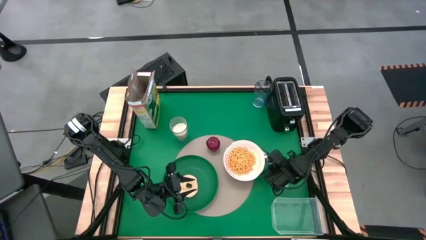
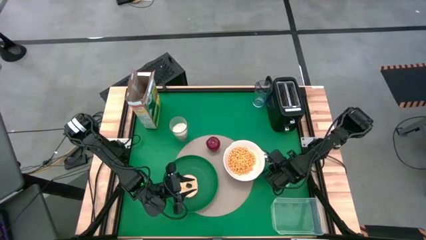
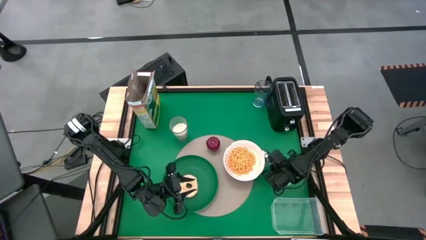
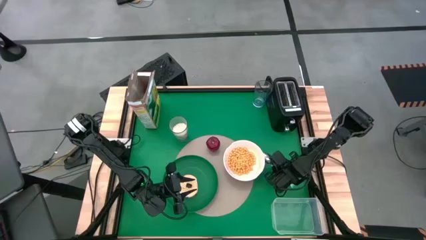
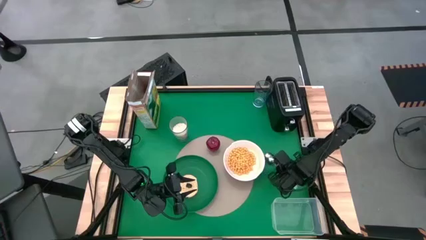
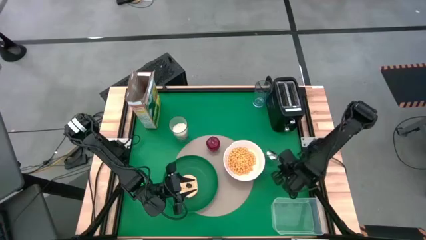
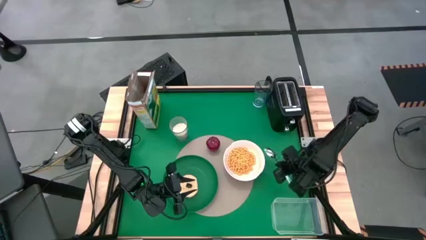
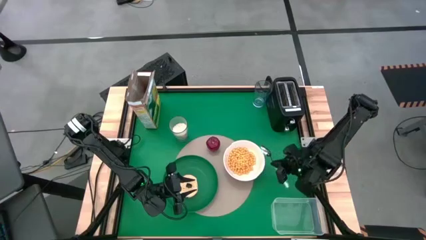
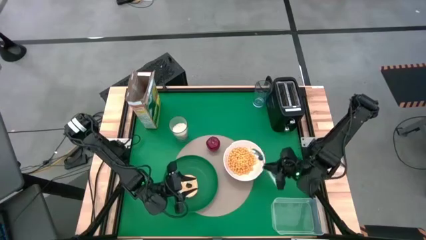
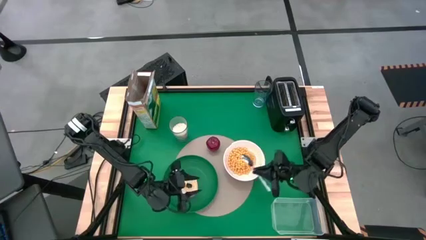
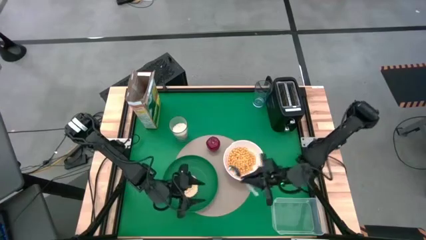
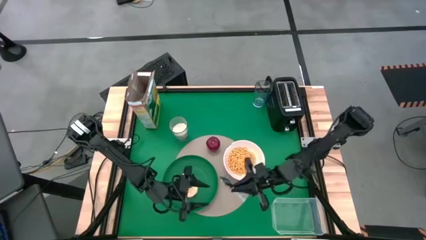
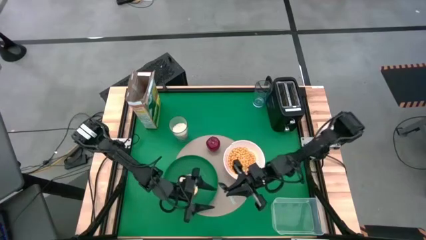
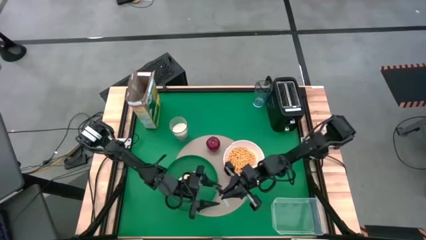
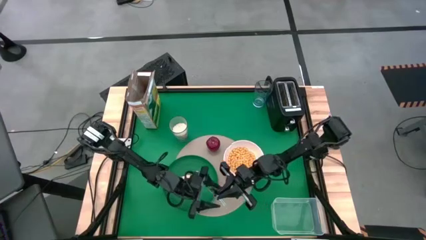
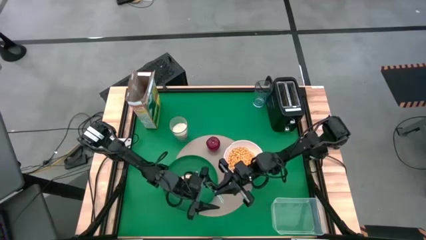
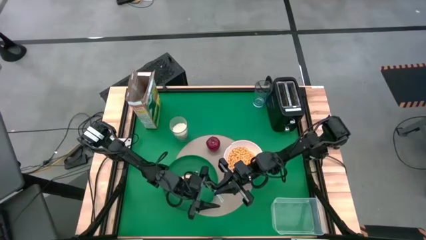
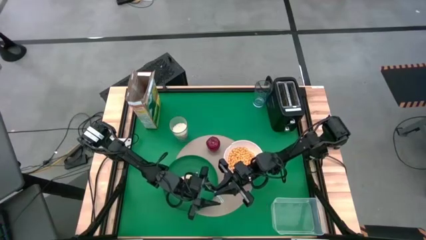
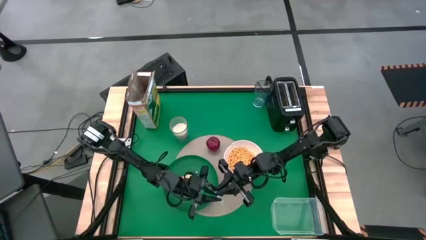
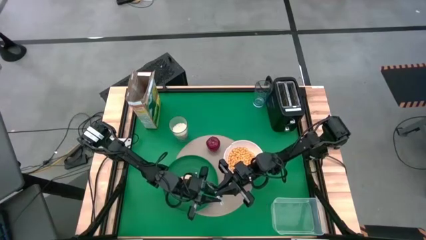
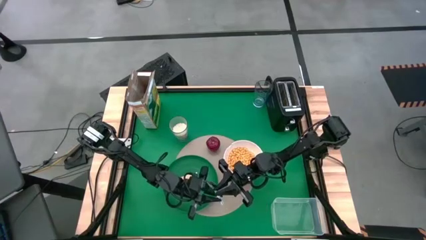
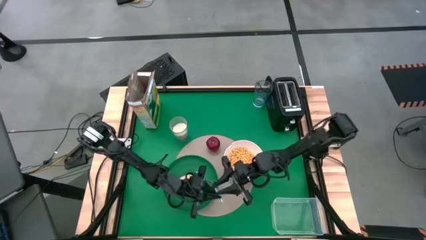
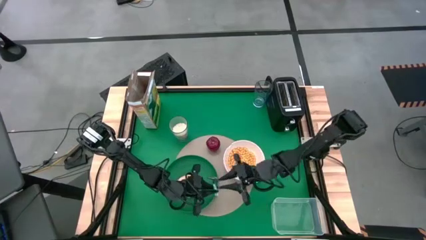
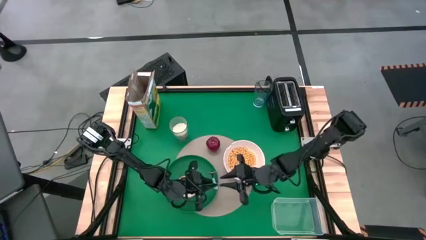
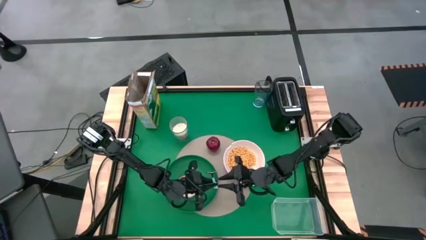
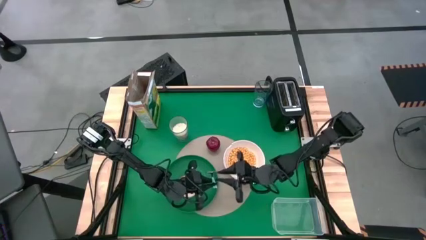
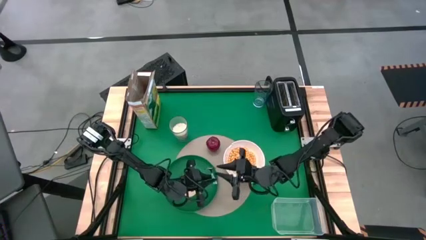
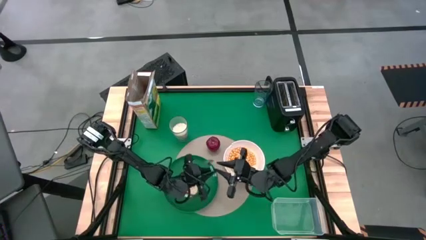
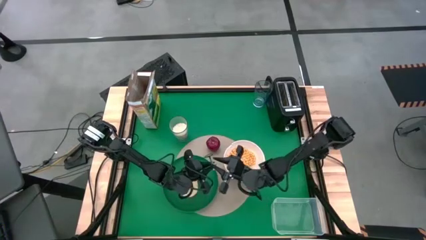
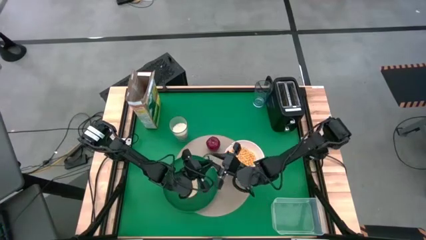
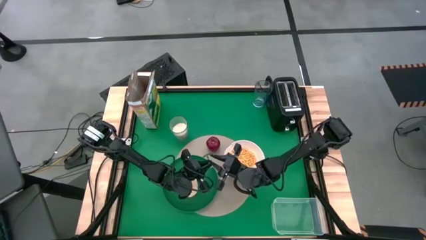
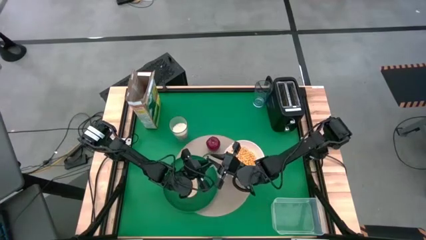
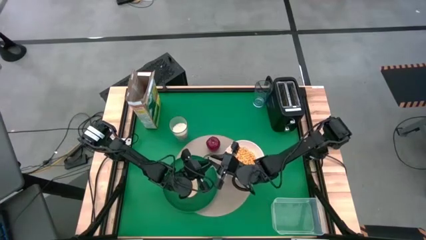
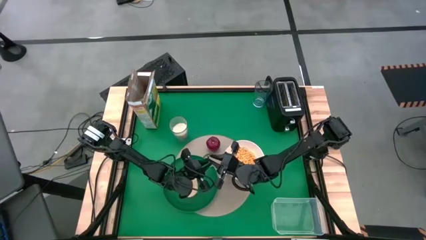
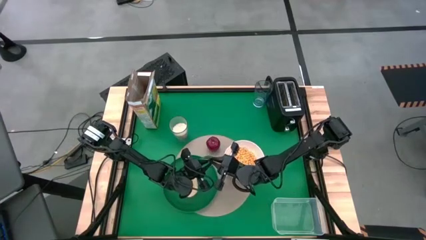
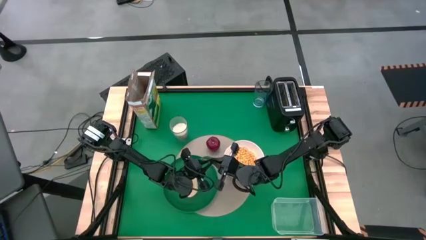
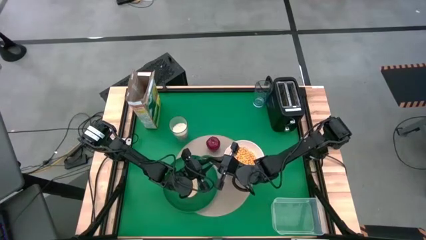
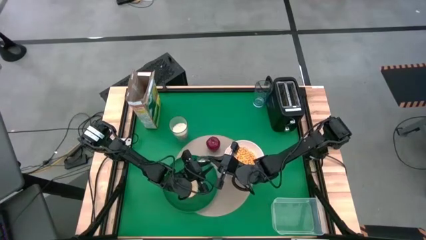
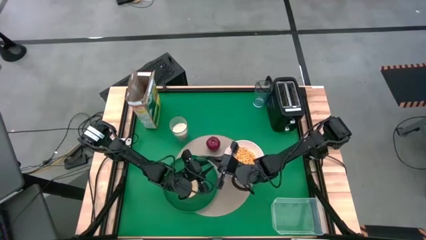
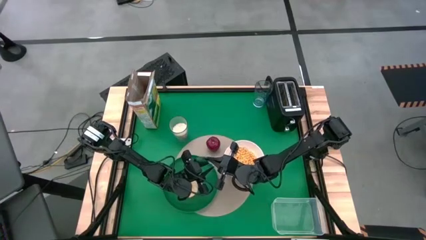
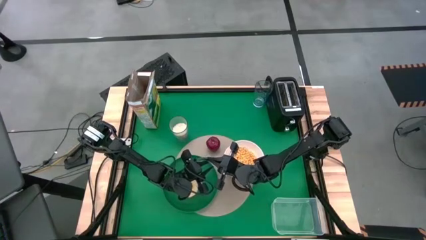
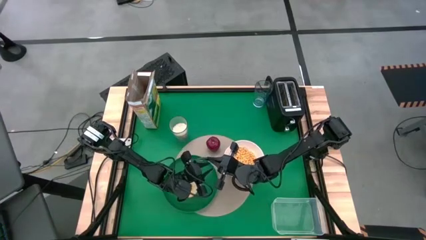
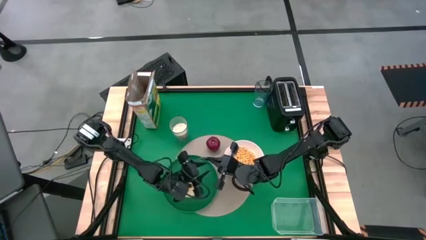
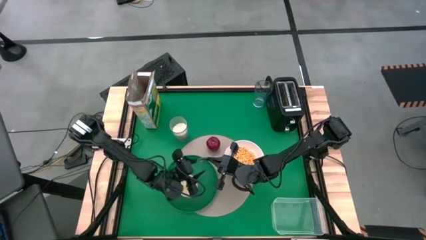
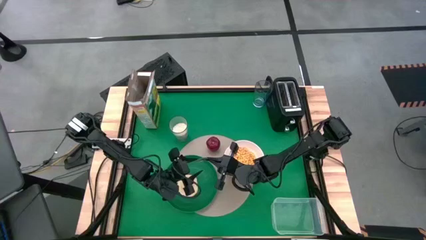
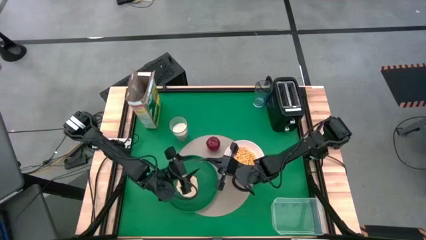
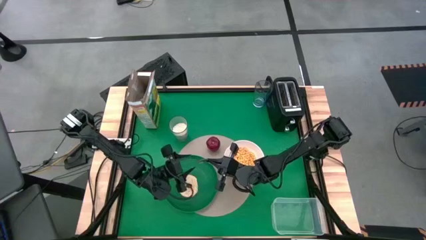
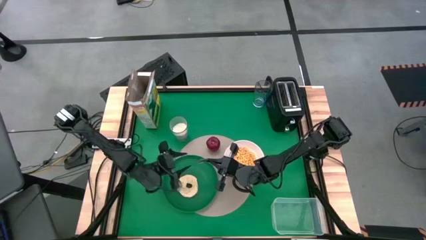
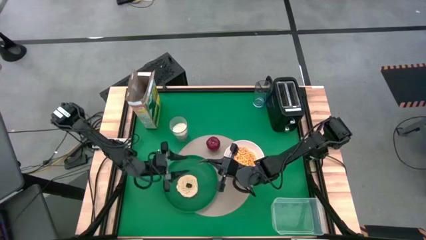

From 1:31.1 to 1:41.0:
Task: Arrange a breakfast setting
Put the white green spoon to the right of the white bowl on the table

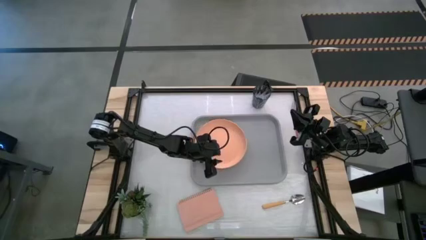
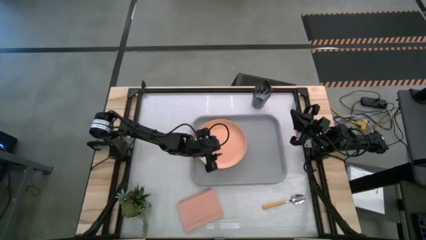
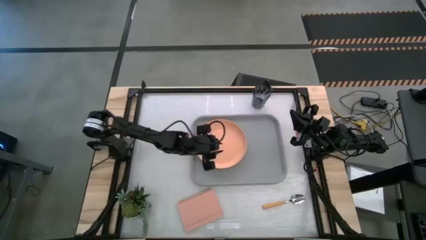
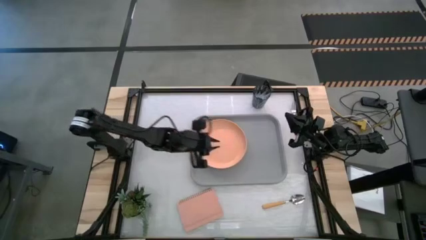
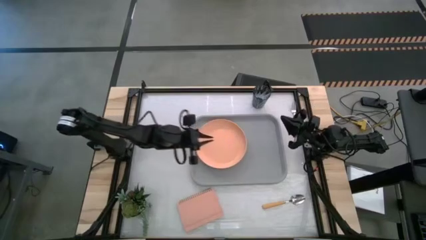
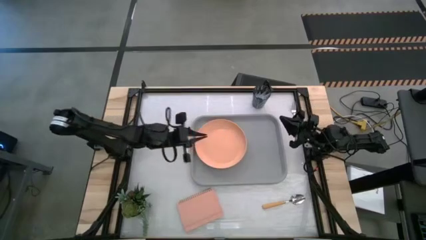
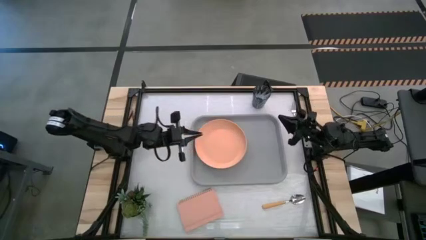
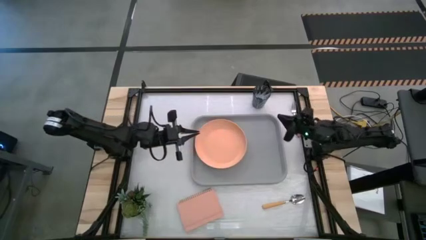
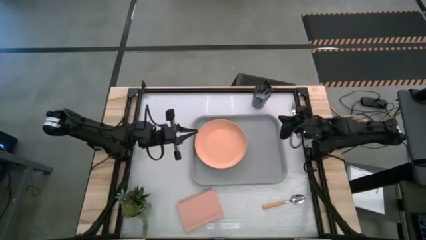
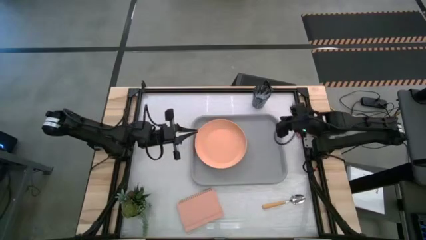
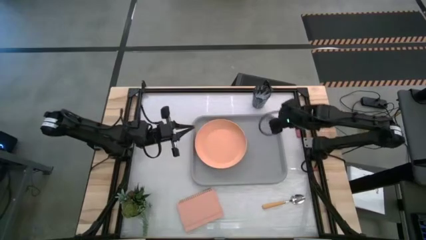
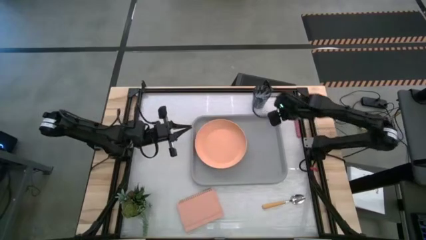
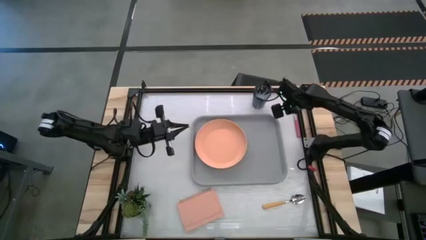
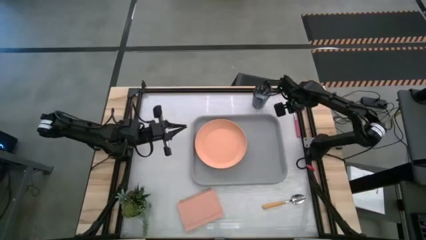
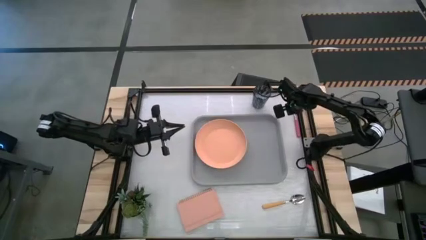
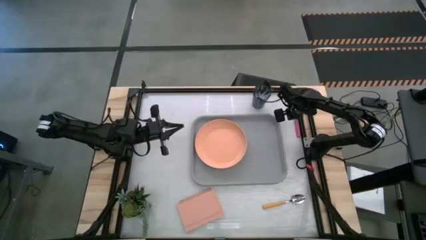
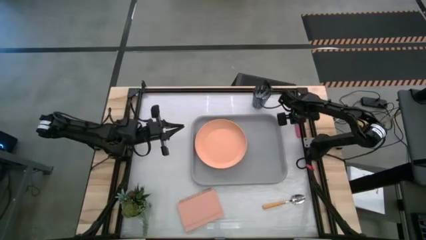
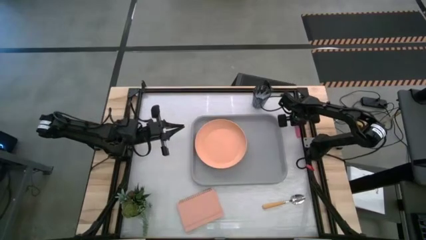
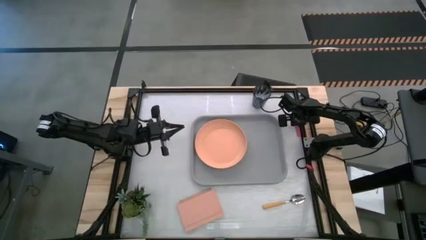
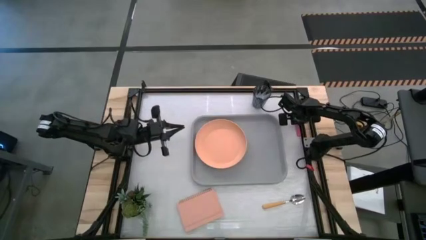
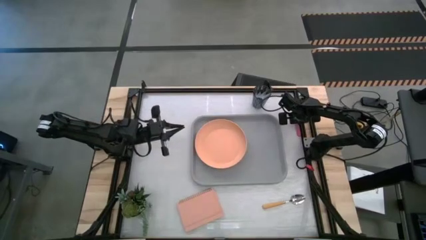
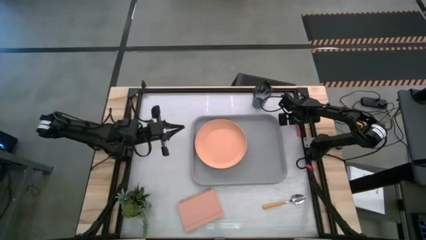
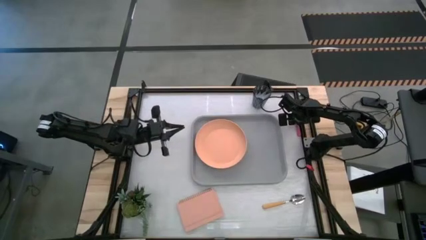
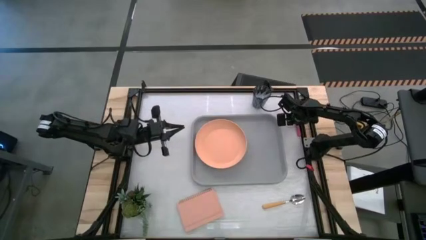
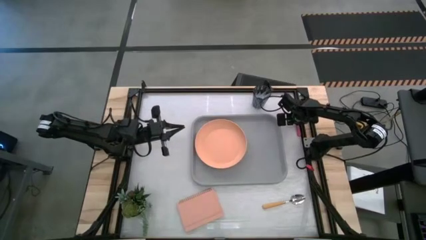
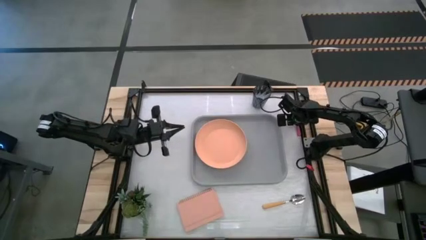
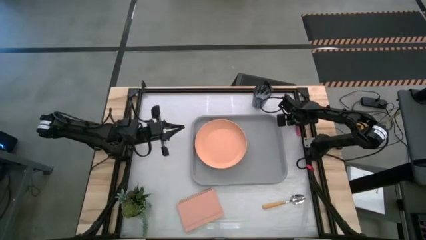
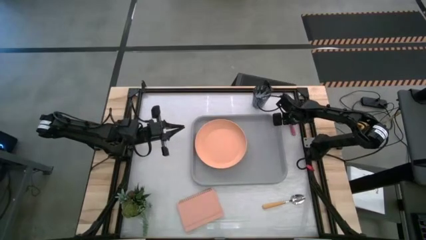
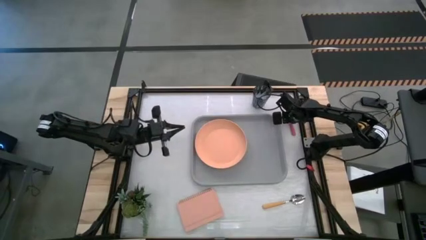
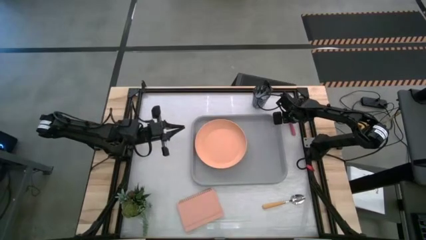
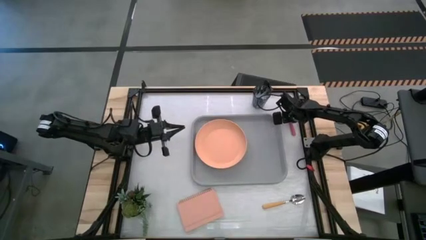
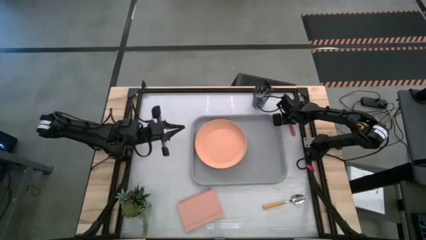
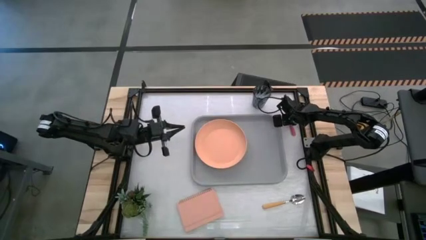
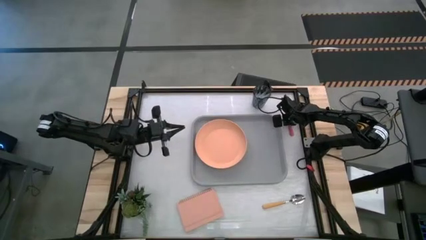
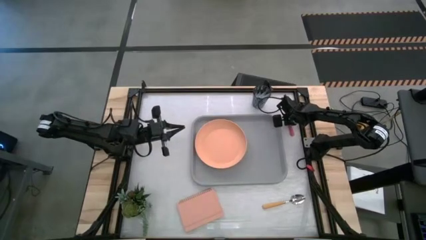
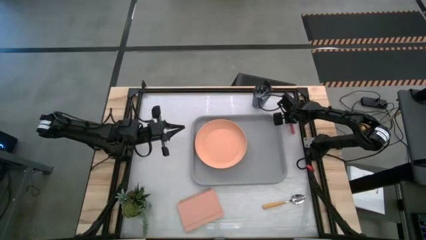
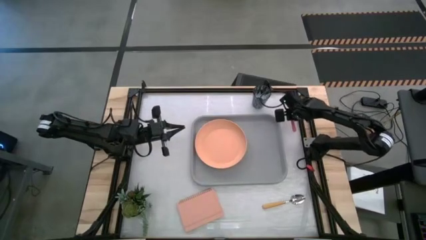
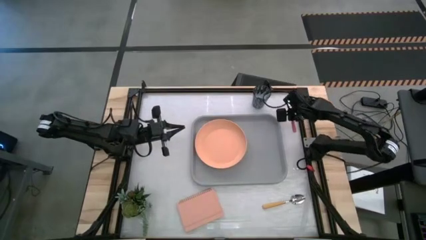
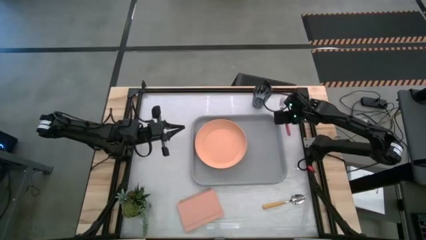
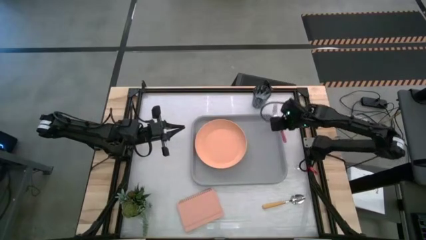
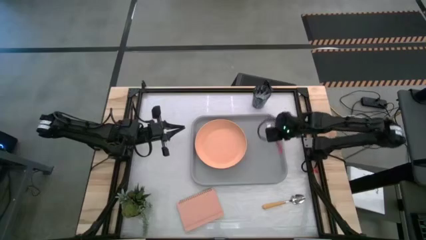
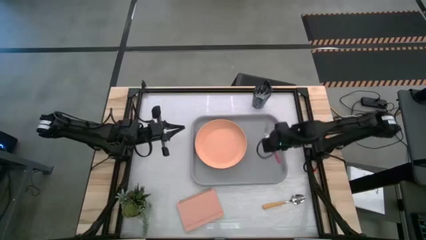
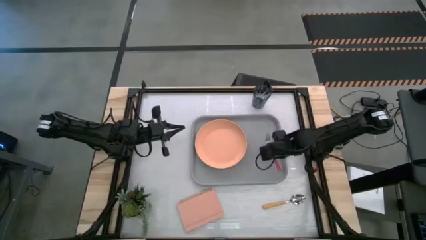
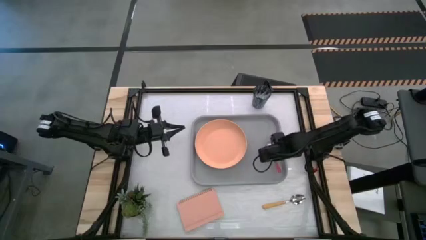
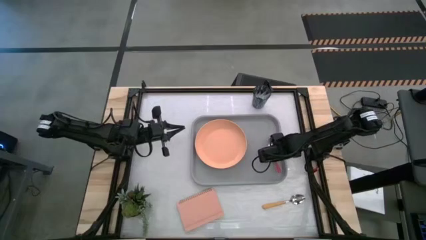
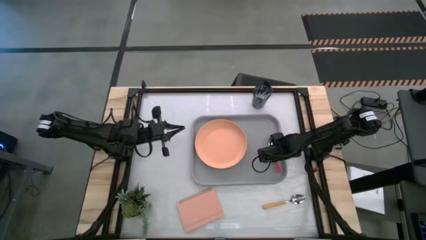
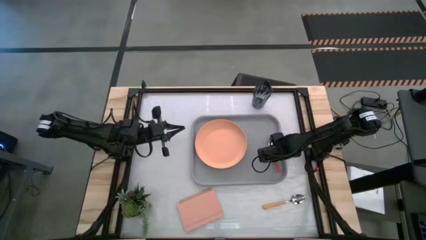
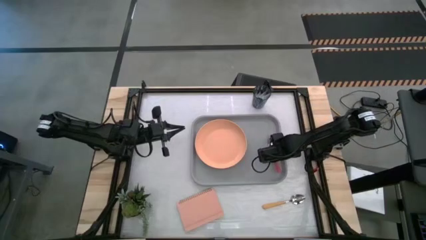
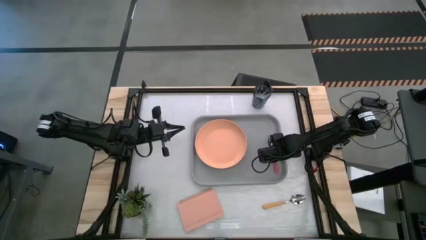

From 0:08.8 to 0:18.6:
Task: Pick and place plate/cup/fork/spoon on tray
Put the pink fork on the right side of the gray serving tray
